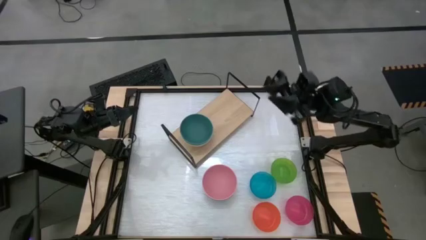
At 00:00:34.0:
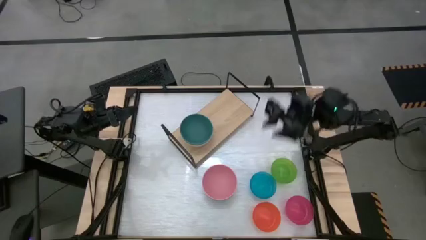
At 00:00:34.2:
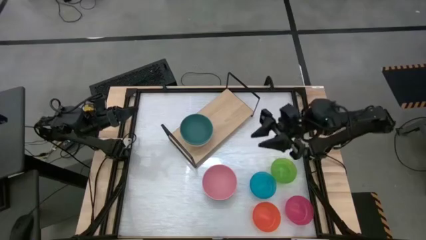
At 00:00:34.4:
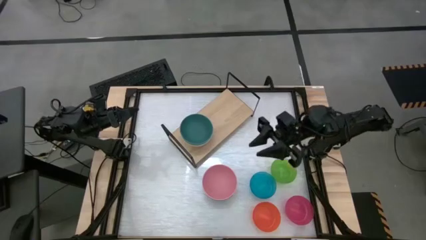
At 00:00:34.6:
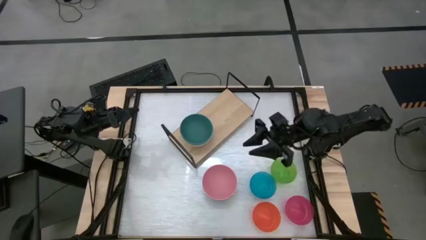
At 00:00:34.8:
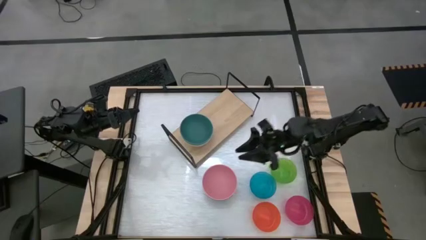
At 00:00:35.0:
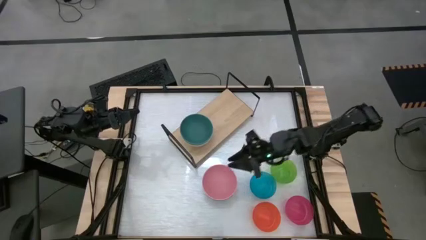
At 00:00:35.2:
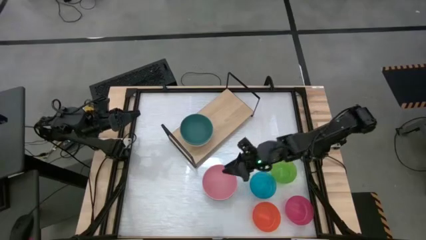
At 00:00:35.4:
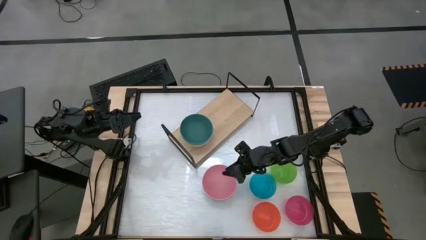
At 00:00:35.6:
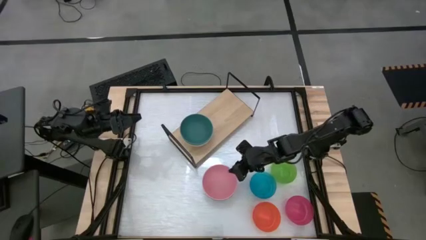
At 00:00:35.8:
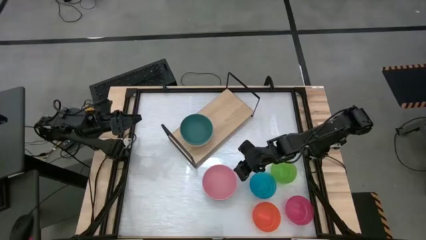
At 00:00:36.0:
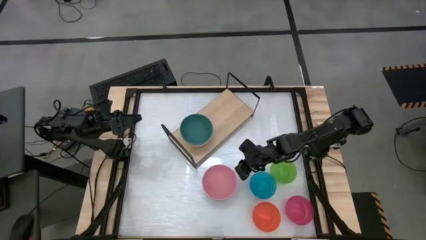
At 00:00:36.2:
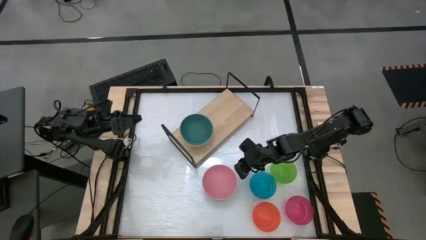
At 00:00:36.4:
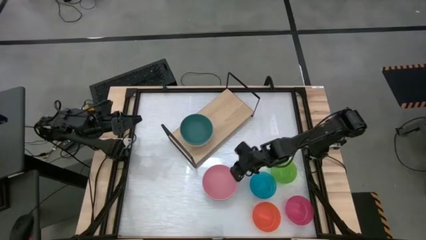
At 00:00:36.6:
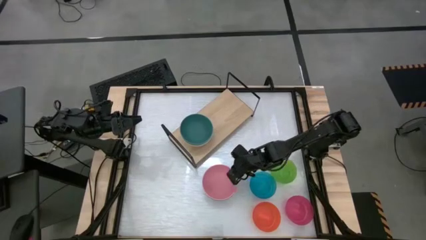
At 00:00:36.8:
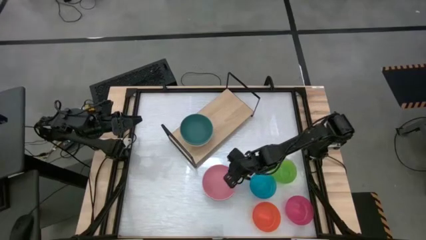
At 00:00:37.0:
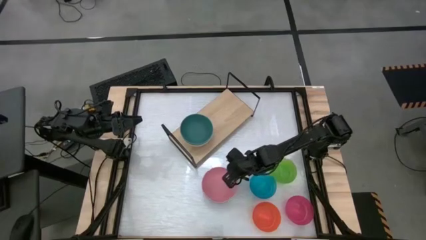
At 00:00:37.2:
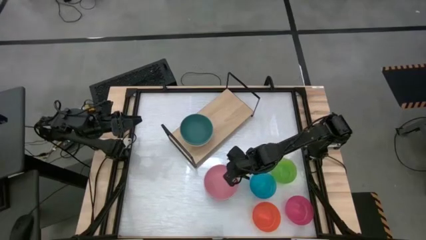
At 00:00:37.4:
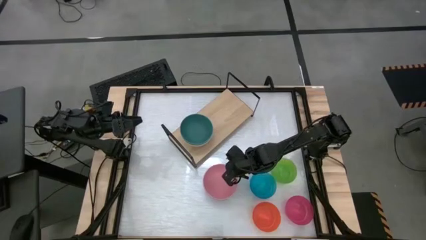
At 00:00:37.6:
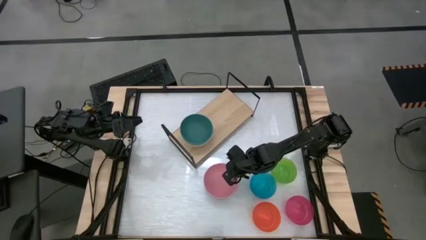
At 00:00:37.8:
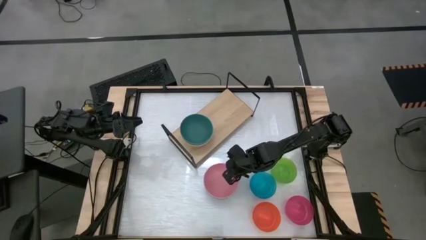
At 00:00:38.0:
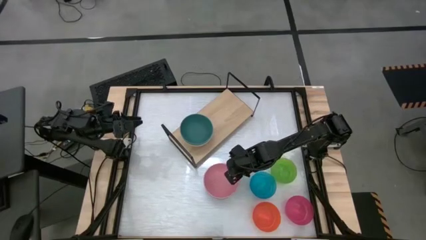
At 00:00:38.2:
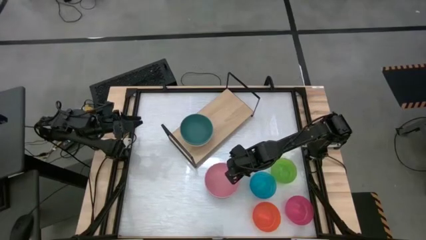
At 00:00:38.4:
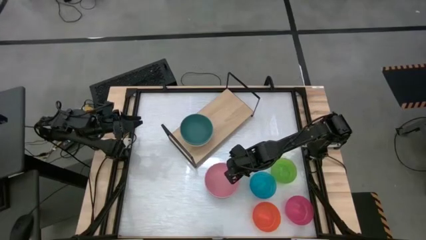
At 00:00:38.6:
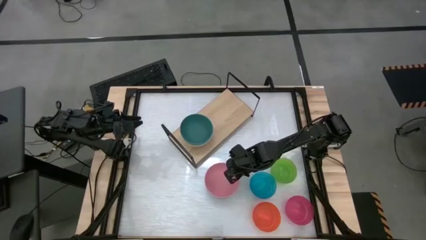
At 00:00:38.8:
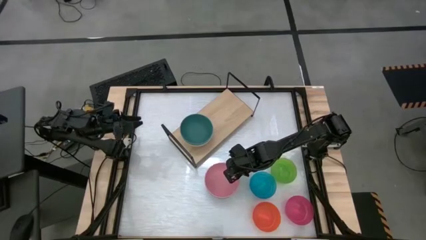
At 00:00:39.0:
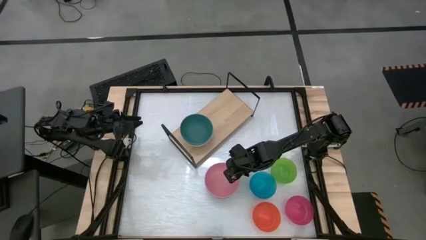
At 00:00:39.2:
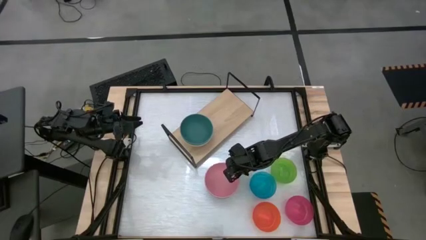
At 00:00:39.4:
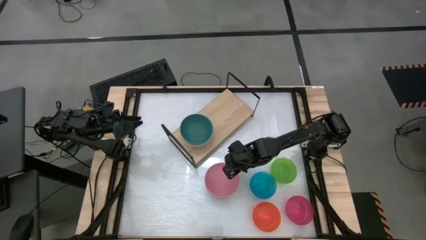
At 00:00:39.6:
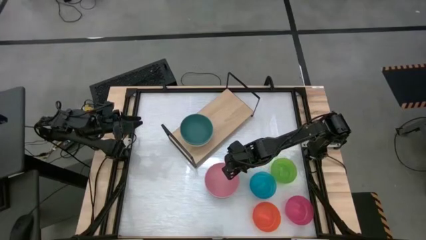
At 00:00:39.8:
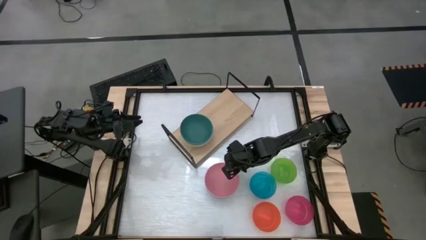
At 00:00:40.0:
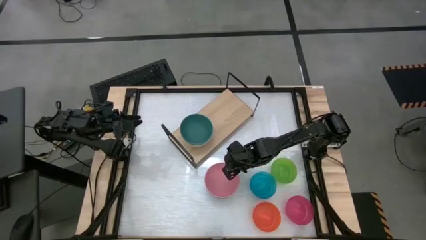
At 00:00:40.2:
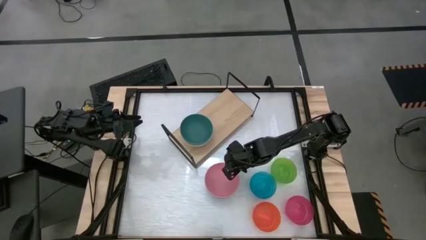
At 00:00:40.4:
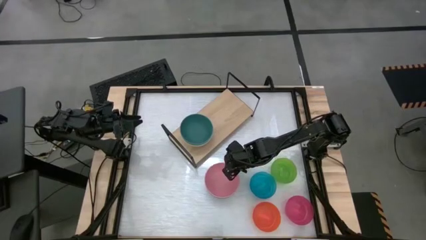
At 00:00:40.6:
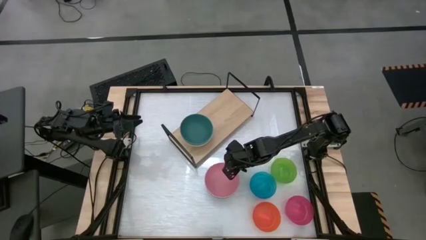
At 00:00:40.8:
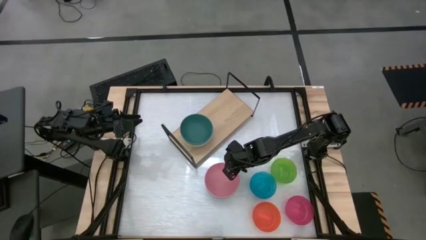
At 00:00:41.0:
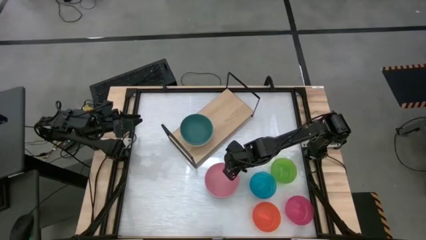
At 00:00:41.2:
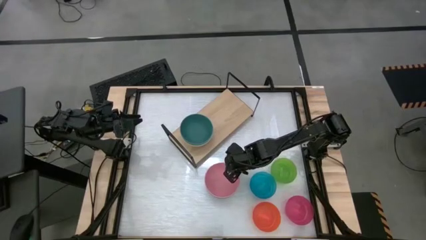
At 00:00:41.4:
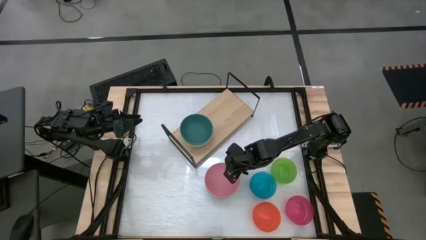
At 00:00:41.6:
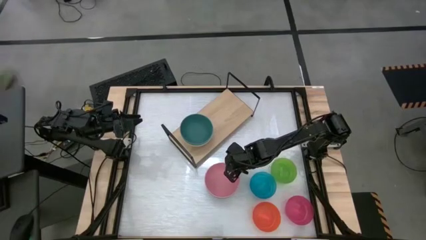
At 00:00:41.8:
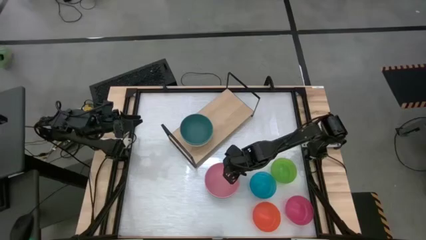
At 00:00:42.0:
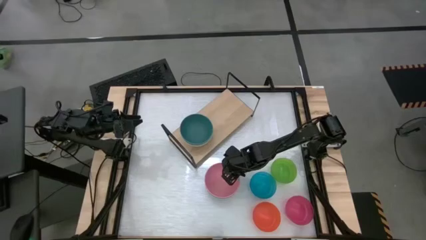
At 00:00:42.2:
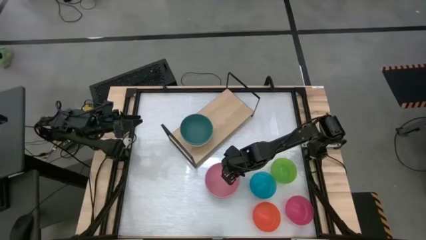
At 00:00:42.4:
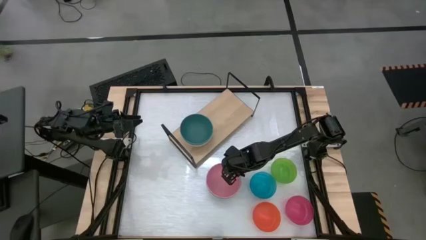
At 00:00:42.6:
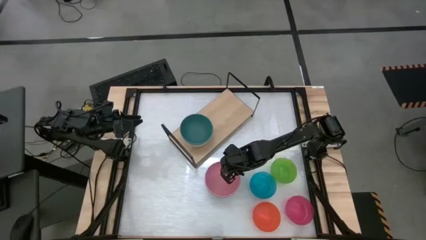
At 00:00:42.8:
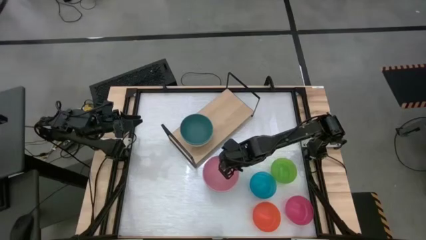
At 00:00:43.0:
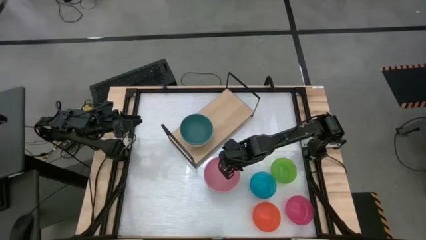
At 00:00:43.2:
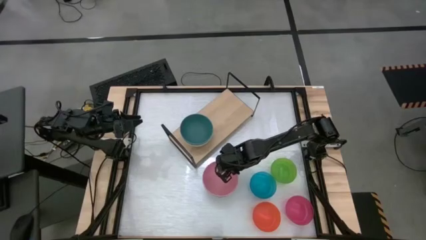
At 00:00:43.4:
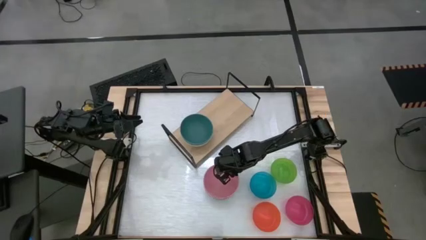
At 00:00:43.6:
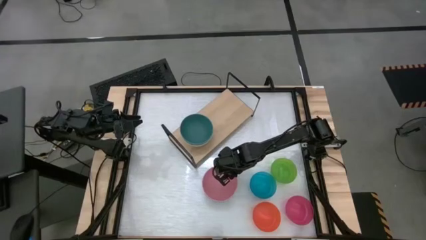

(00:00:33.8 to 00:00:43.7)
Task: Place and stack bowls onto a shelf
Stack the pink bowl on top of the dark green bowl on the shelf

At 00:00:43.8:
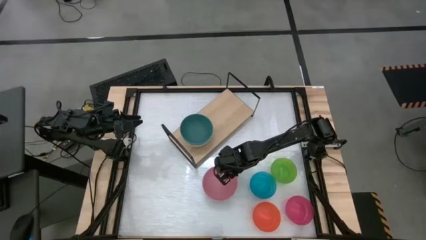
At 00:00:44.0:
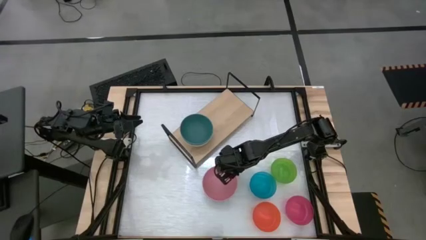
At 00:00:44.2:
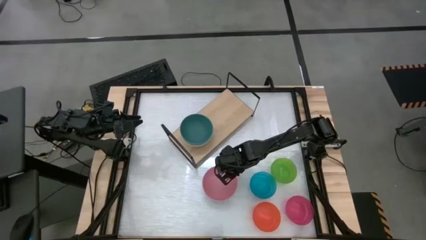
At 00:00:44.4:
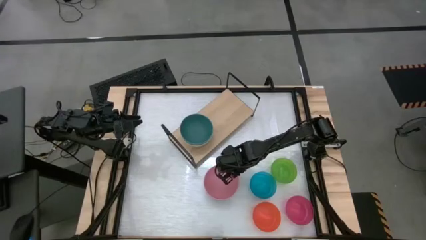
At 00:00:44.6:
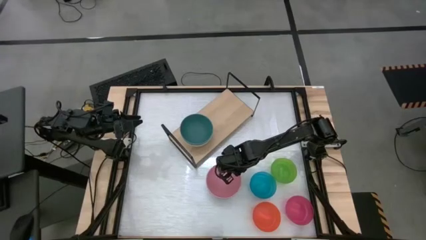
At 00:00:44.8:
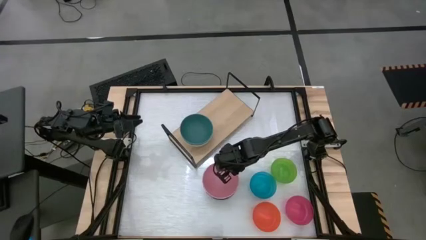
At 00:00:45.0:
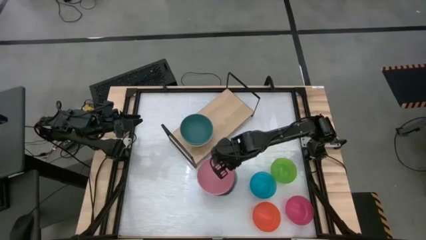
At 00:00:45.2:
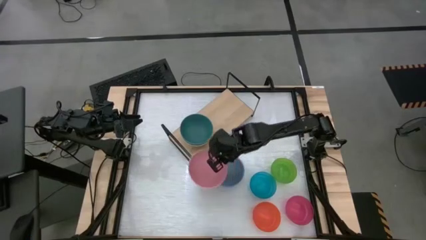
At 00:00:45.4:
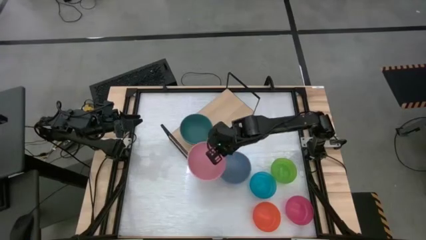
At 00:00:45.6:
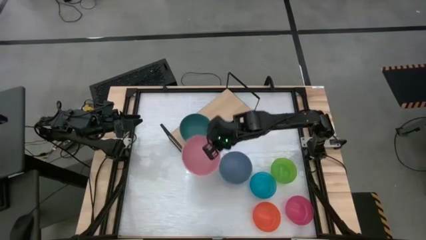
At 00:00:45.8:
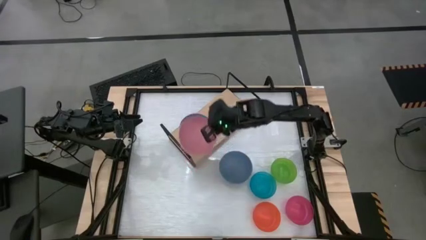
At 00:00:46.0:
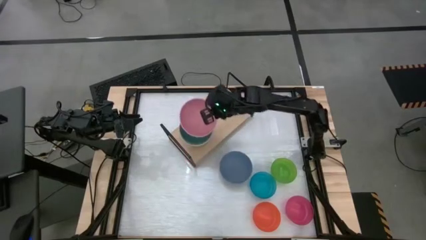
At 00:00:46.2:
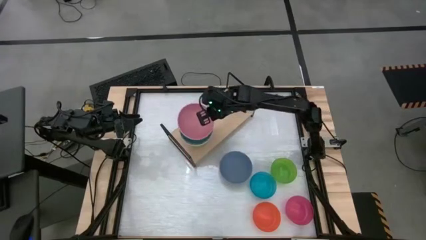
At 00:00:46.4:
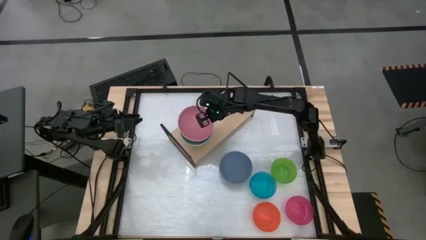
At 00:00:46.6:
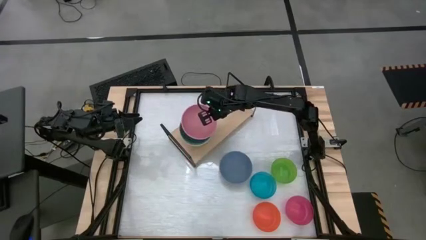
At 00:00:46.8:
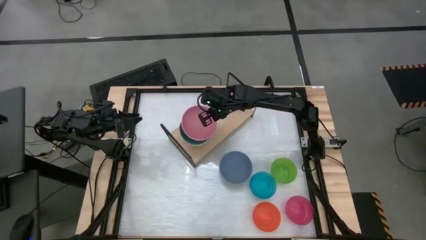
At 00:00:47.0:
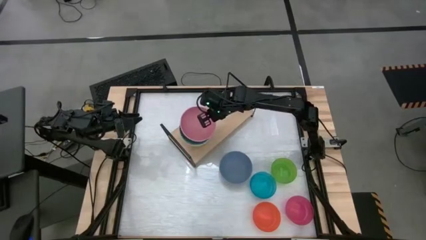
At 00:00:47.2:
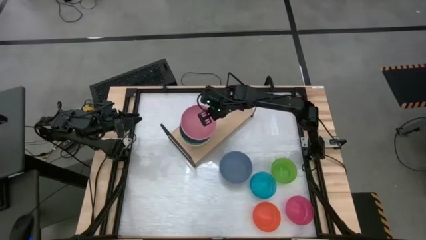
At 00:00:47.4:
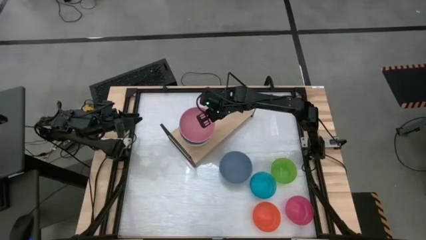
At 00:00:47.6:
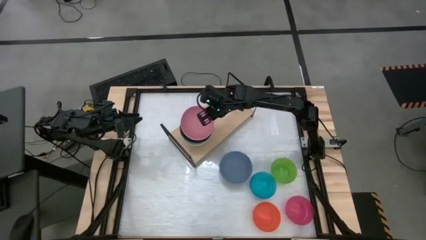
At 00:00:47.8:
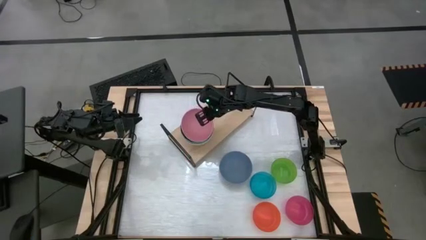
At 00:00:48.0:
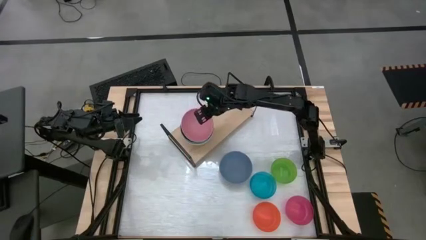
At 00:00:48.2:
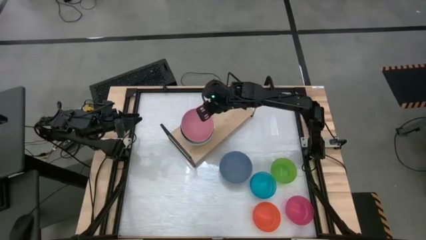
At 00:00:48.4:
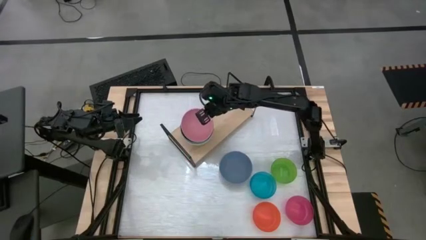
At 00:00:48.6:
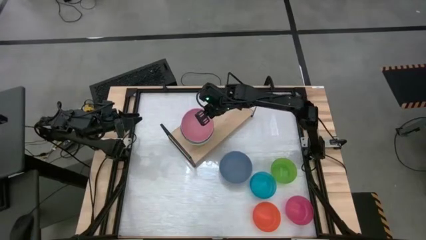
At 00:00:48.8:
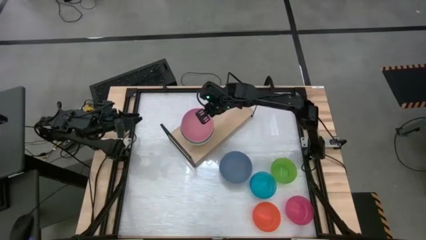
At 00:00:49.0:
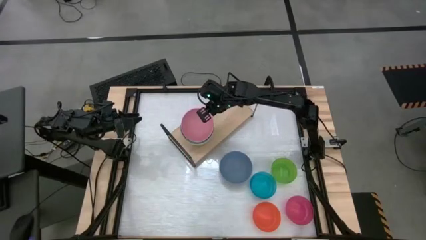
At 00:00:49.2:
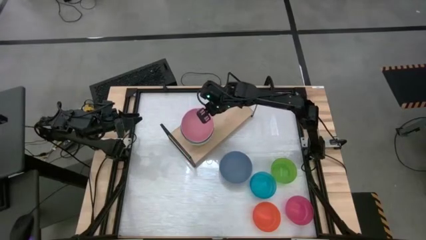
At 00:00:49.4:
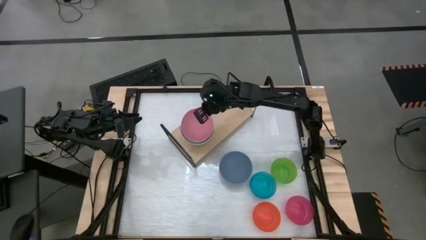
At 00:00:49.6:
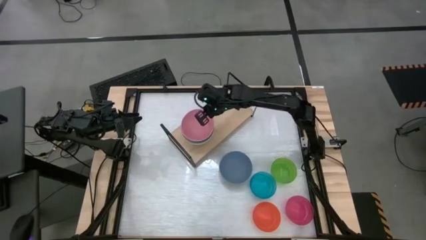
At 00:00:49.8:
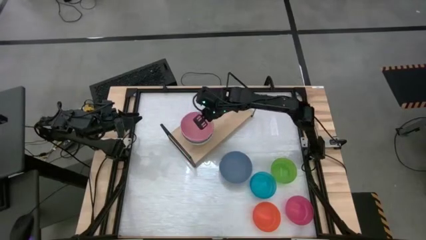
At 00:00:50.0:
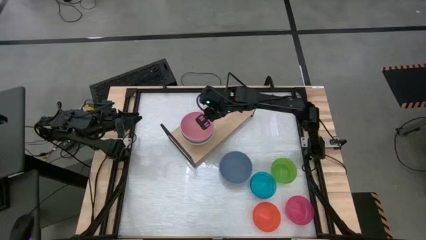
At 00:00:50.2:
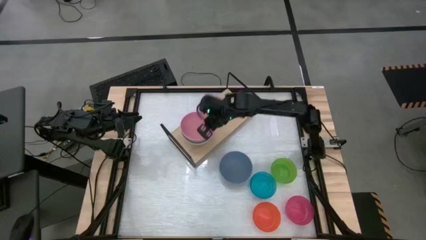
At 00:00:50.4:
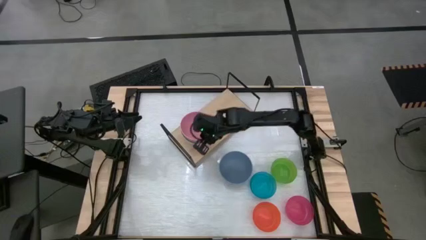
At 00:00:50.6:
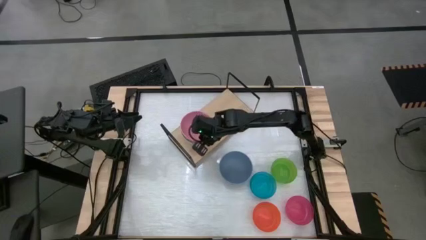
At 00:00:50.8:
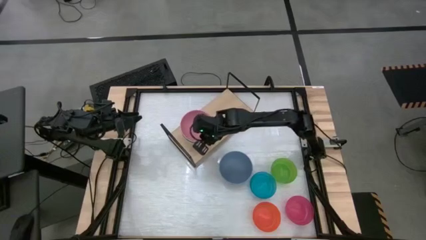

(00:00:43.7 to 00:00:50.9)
Stack the pink bowl on top of the dark green bowl on the shelf
